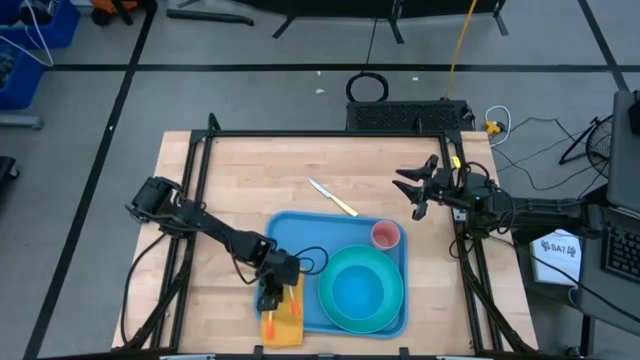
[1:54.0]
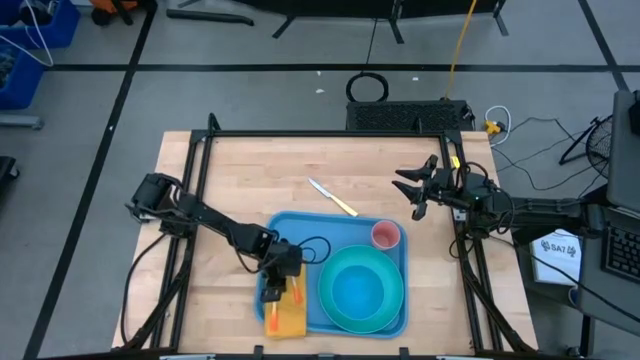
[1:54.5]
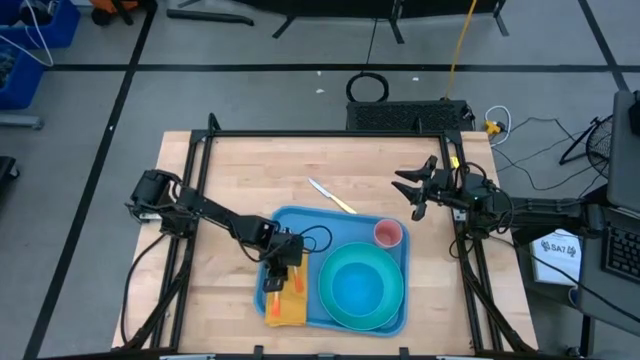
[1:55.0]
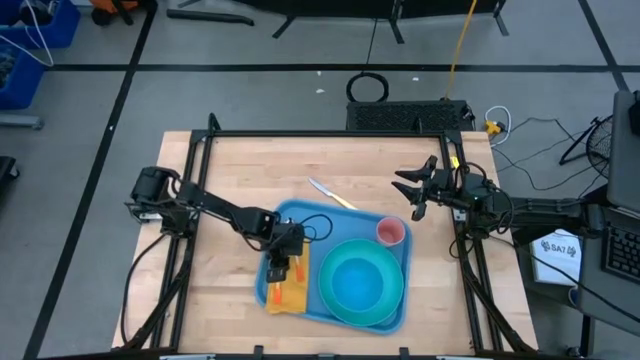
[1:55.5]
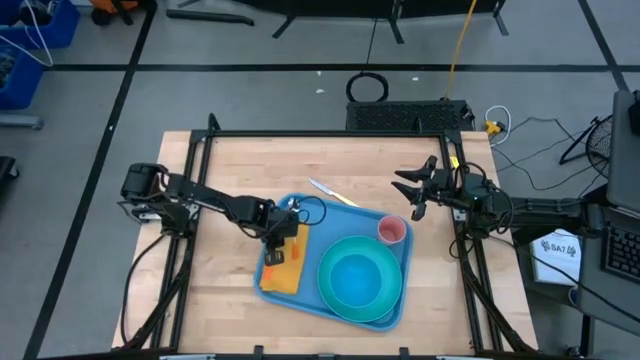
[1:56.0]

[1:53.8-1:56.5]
Task: Set up tray
Adjust the yellow table napkin on the blue tray

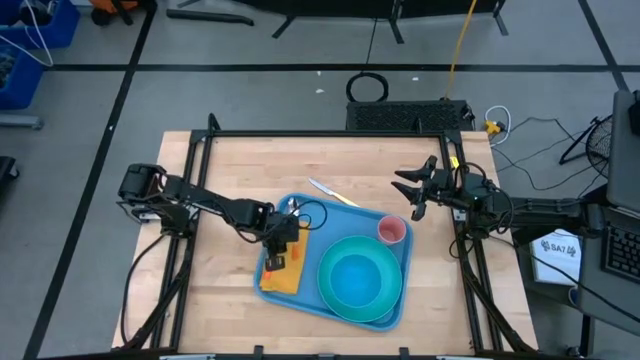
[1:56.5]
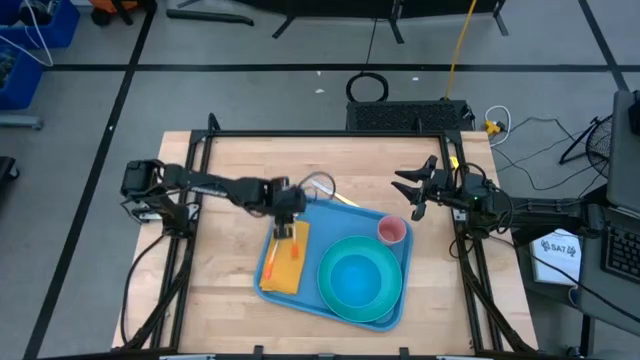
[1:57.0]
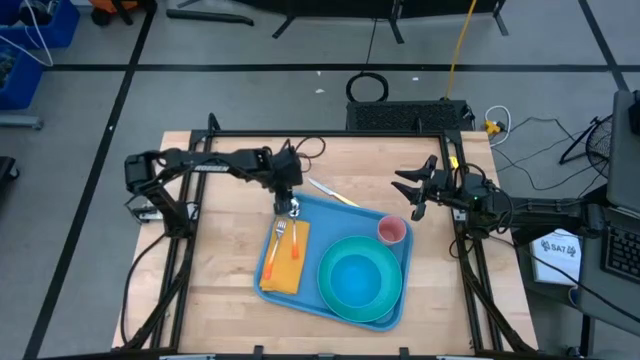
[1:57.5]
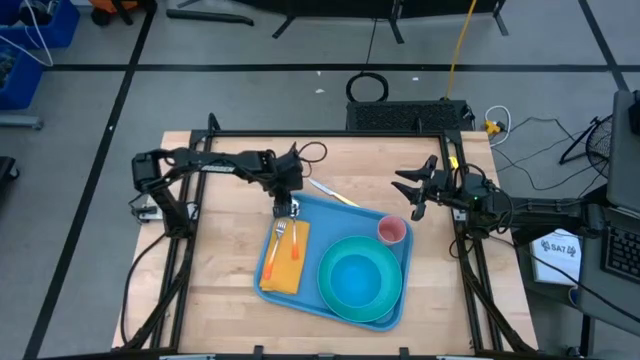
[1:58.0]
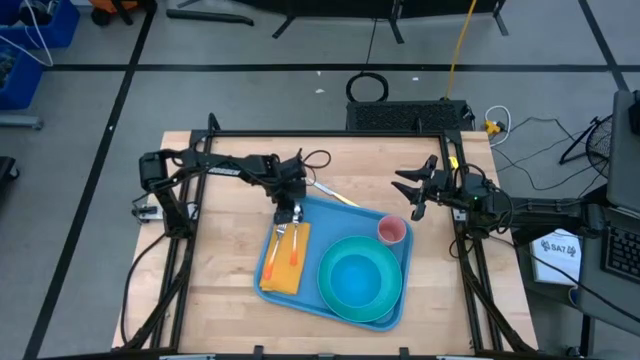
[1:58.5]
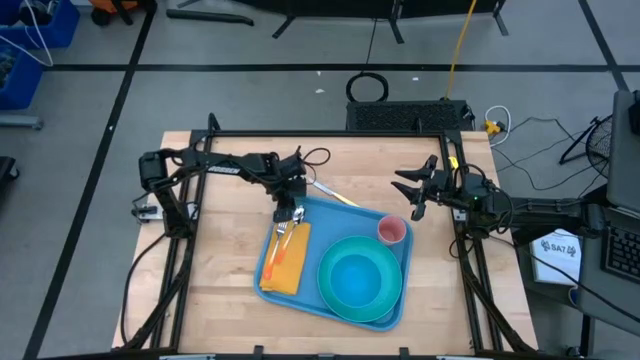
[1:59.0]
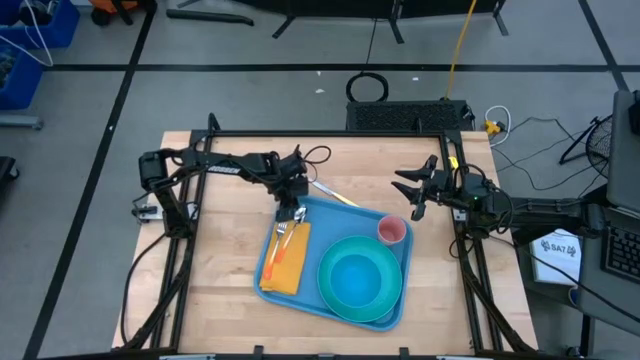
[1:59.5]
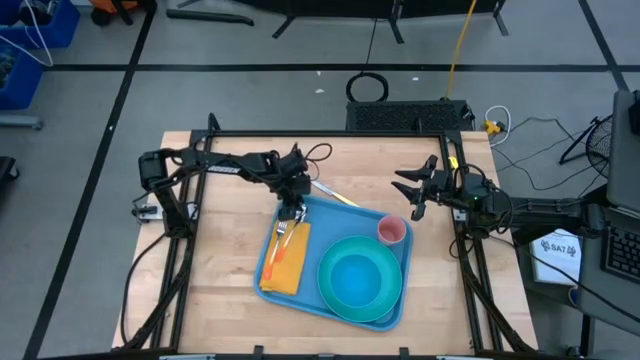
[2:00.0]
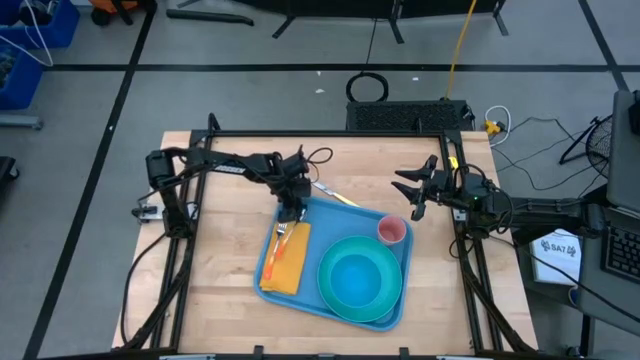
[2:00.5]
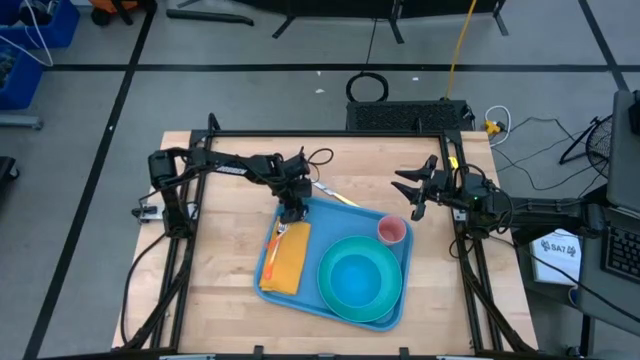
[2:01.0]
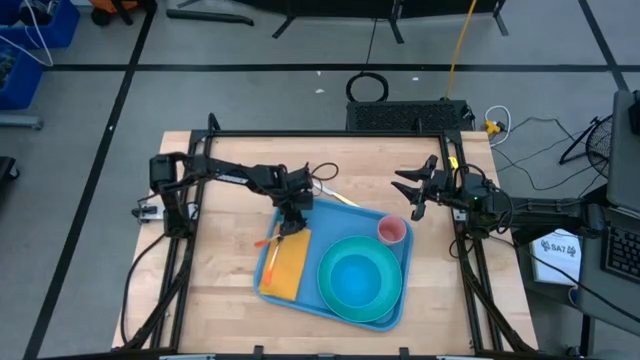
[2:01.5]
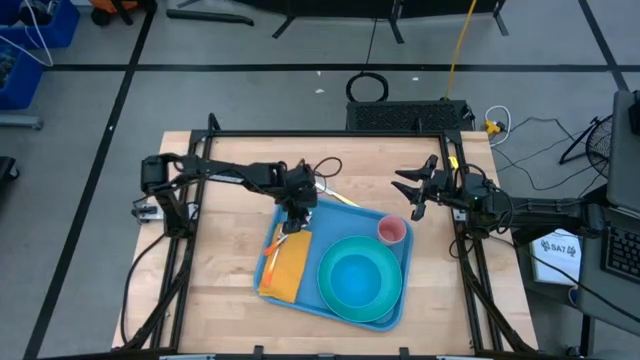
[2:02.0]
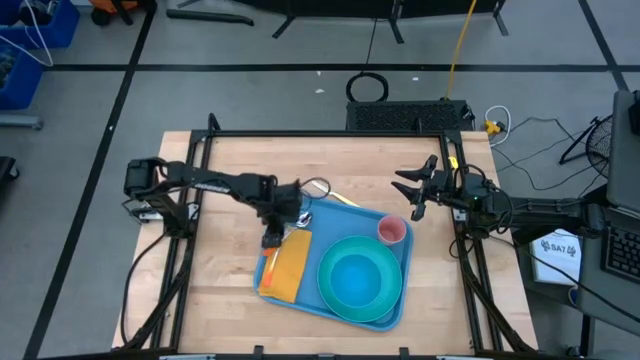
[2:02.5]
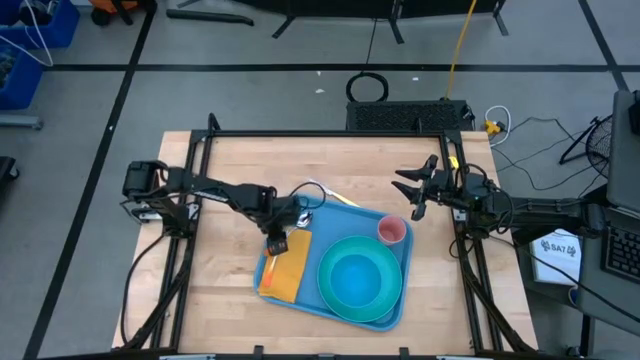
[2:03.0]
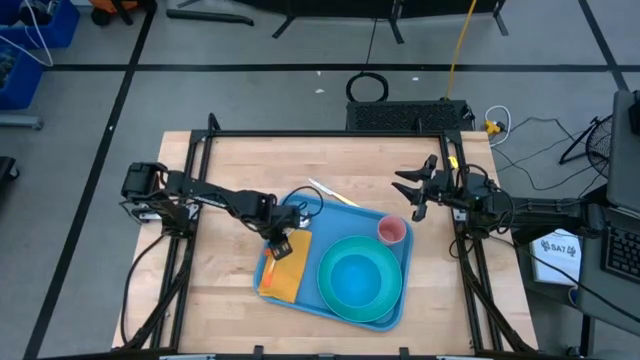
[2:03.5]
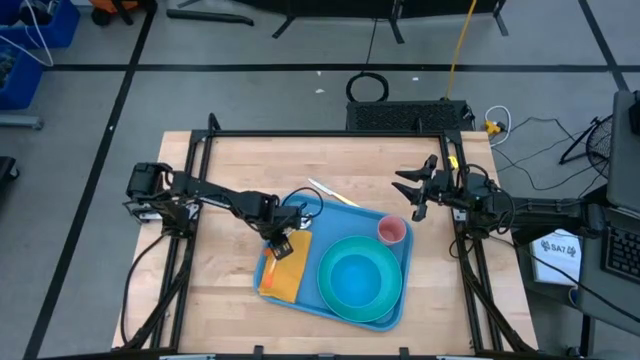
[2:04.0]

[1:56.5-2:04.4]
Put the orange spoon on top of the yellow table napkin

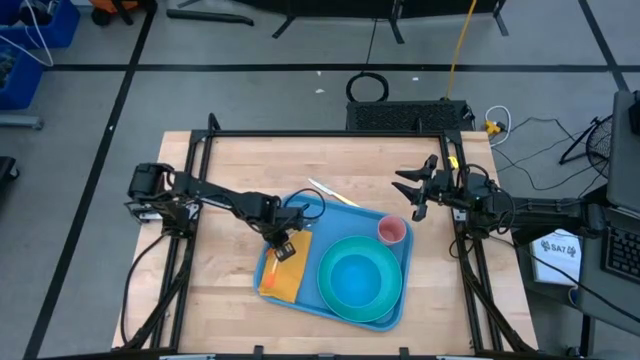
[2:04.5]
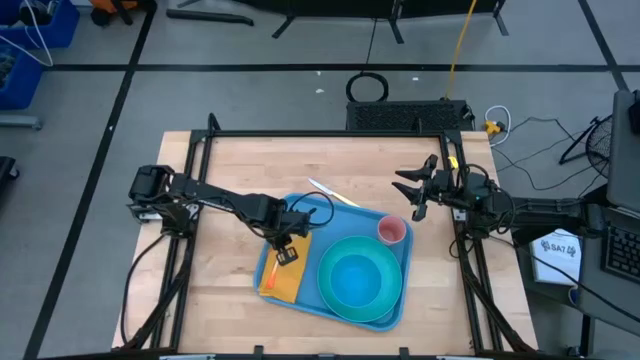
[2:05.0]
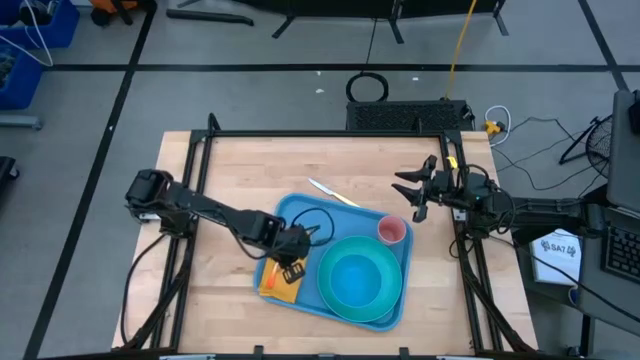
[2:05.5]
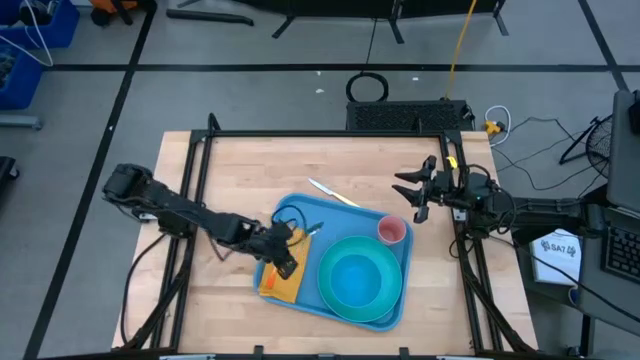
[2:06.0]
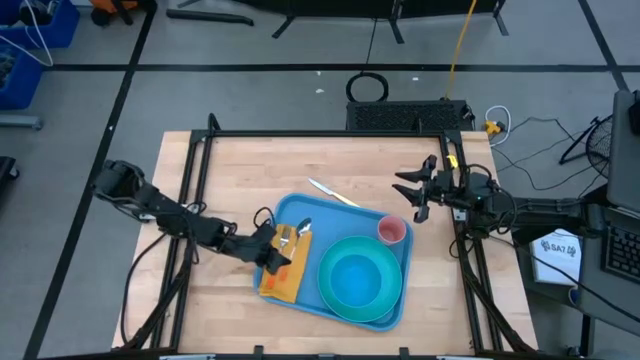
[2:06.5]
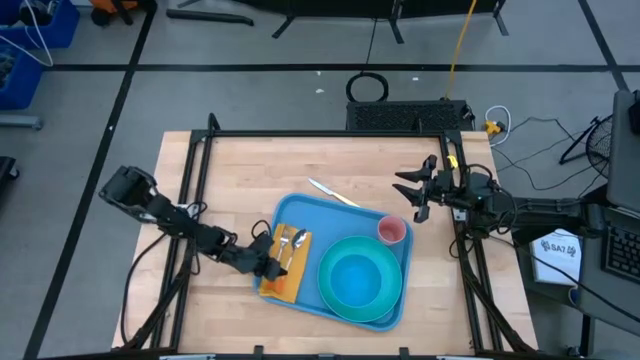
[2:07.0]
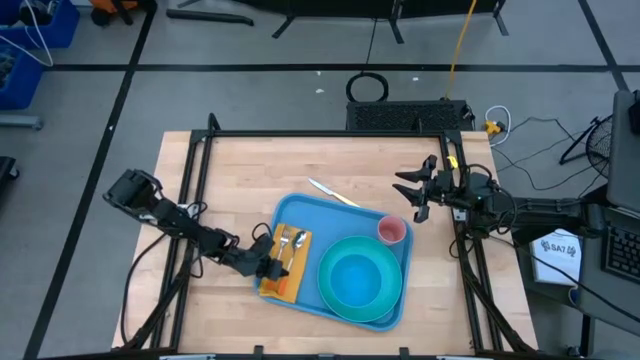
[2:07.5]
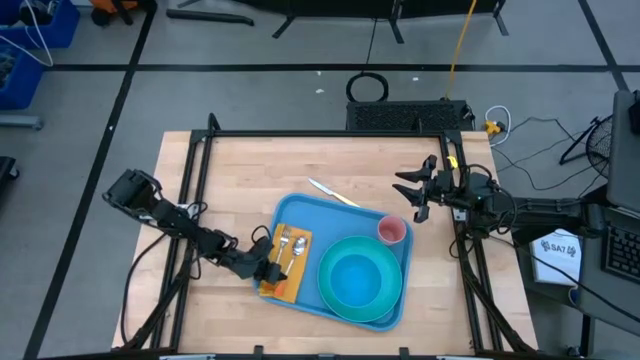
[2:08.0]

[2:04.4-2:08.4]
Put the orange spoon on top of the yellow table napkin

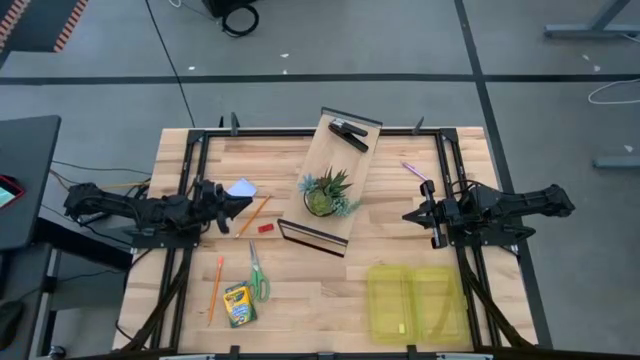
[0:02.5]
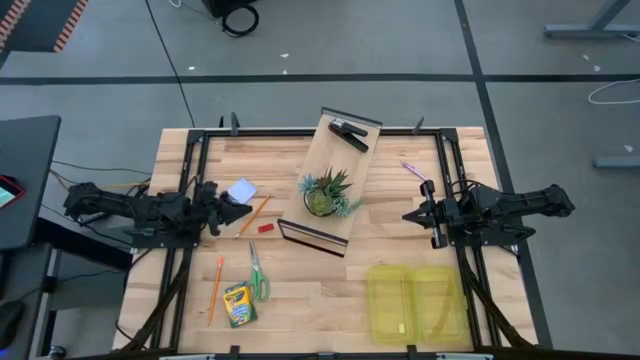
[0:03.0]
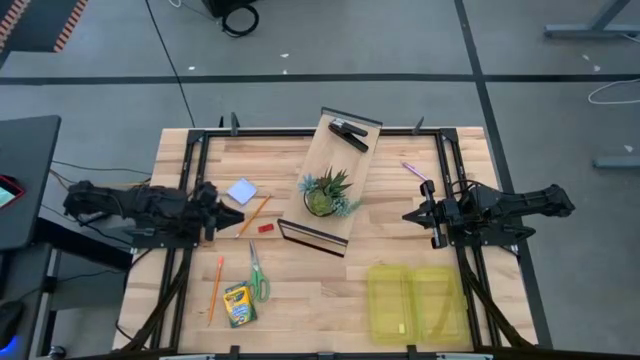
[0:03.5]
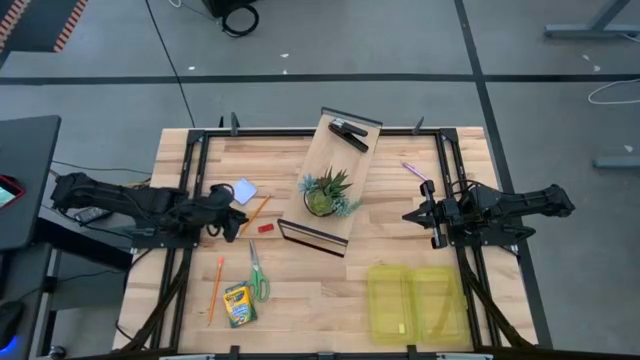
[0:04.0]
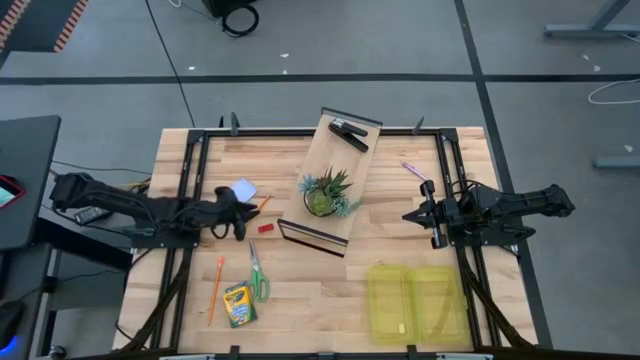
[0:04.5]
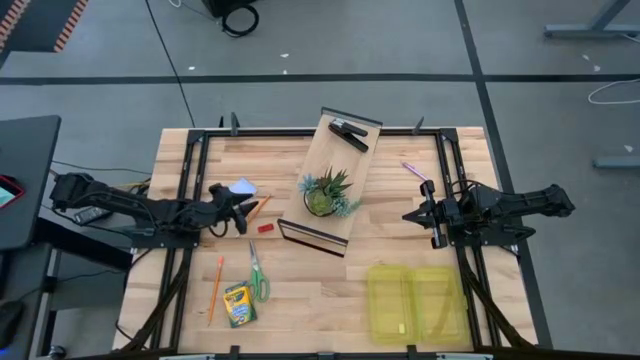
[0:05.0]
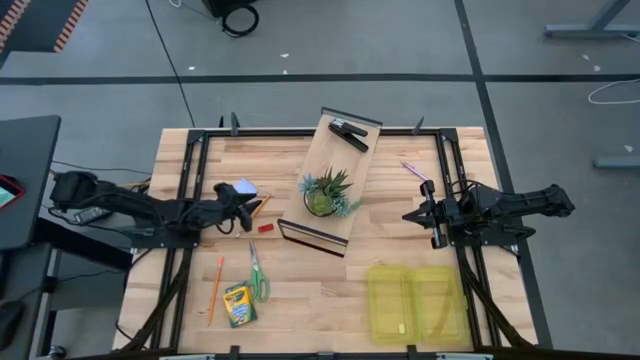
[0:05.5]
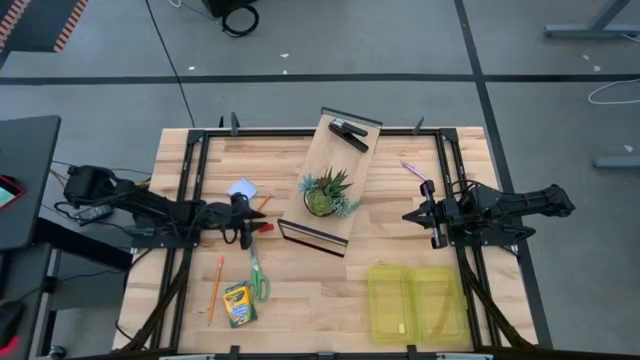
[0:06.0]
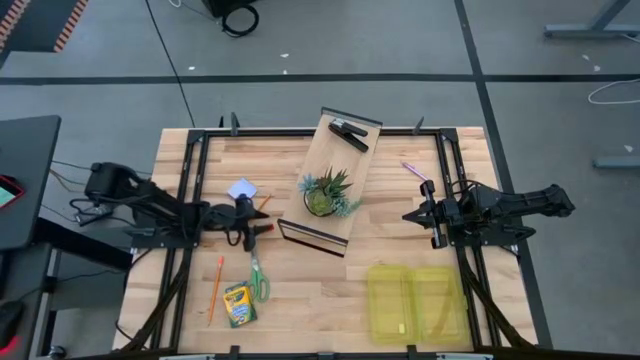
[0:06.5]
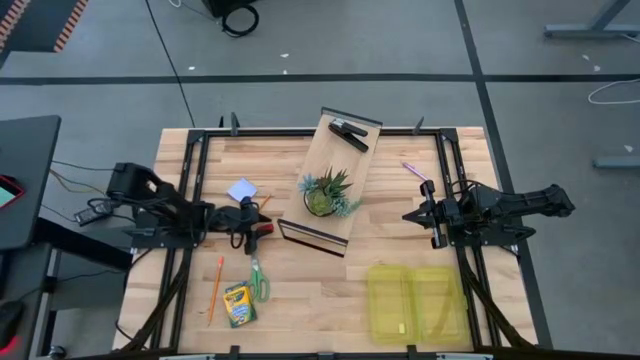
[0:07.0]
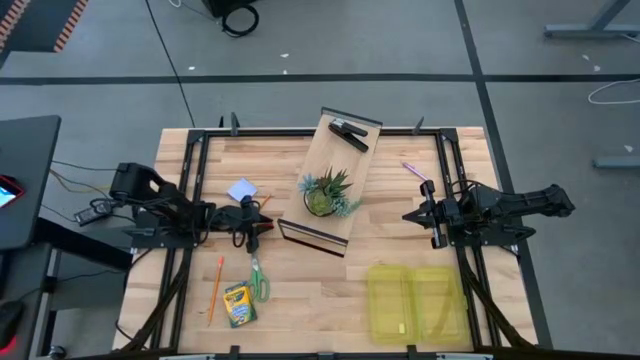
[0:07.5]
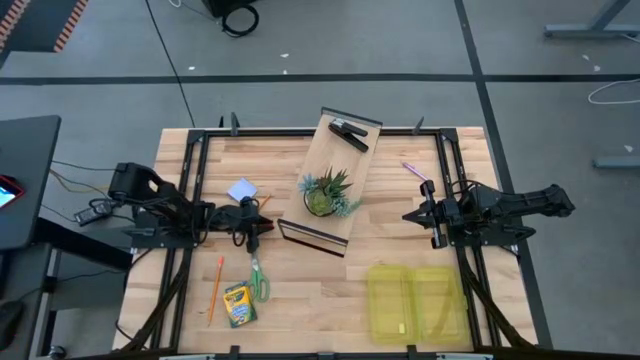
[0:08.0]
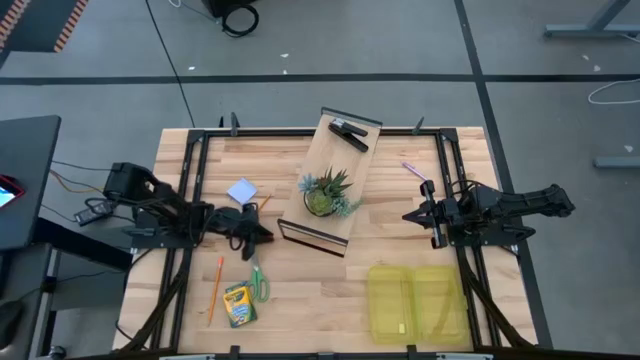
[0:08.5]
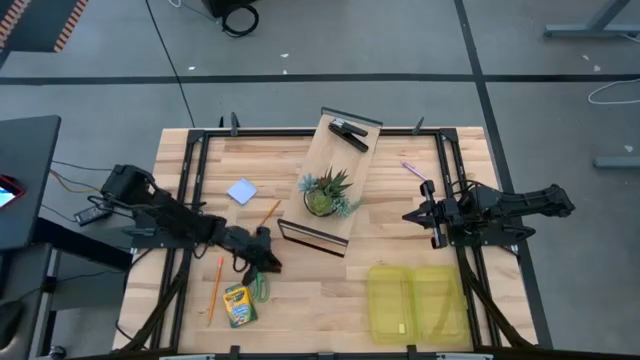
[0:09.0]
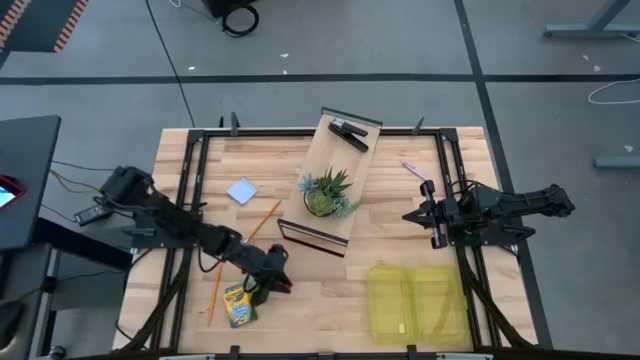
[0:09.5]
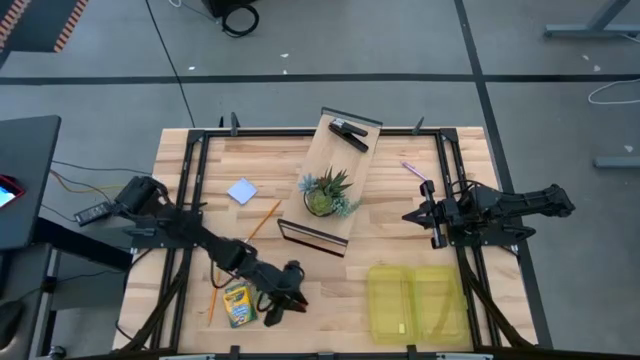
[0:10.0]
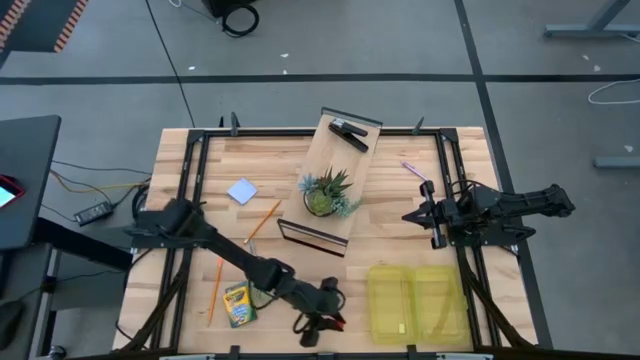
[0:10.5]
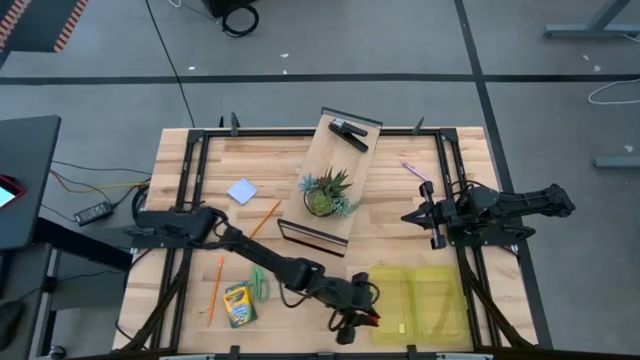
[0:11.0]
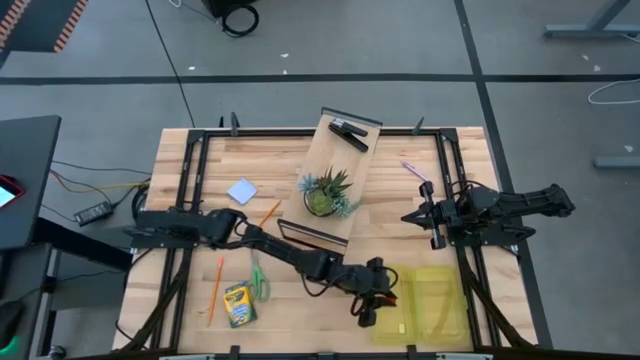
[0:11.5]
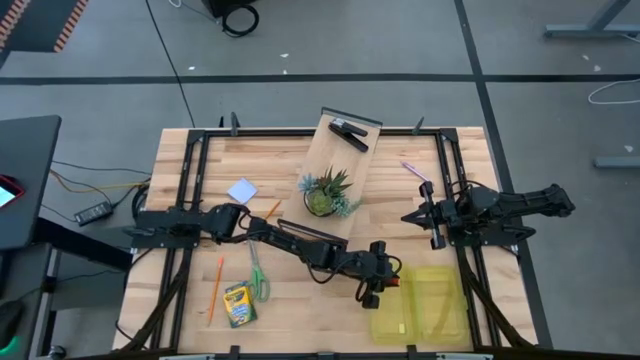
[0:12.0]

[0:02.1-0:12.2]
Task: Pack school essentials
Put the red eraser into the yellow supply box
